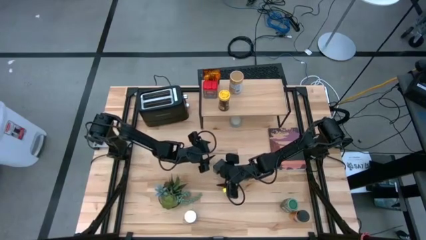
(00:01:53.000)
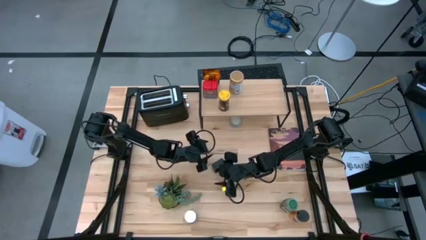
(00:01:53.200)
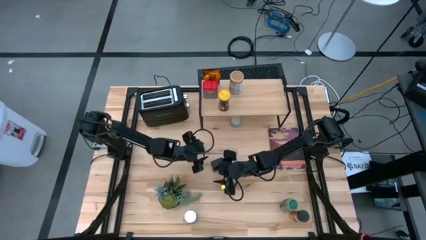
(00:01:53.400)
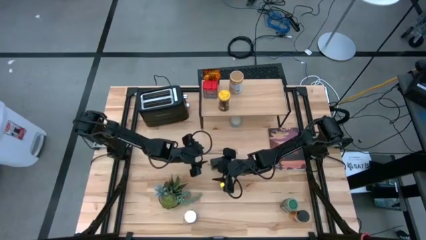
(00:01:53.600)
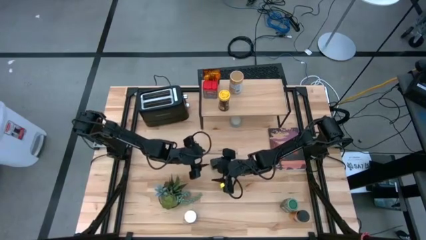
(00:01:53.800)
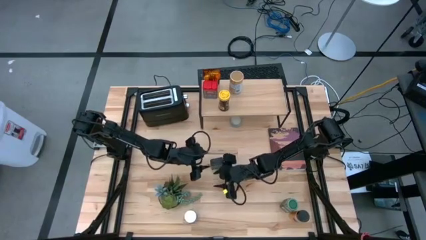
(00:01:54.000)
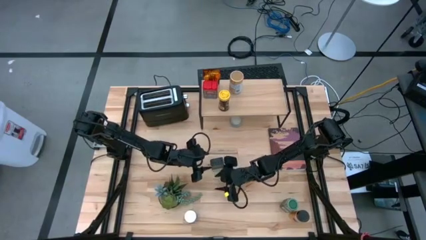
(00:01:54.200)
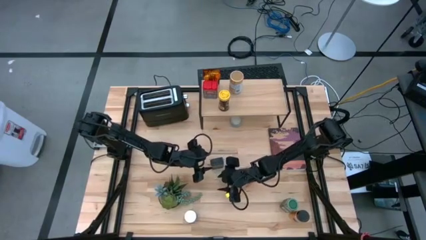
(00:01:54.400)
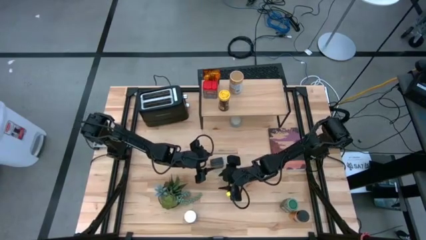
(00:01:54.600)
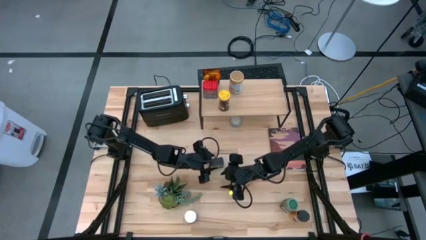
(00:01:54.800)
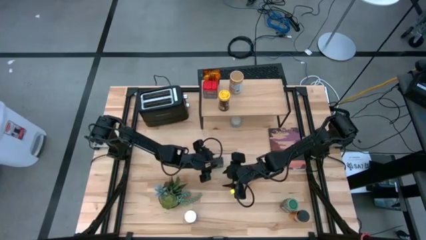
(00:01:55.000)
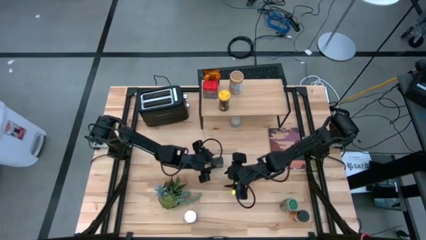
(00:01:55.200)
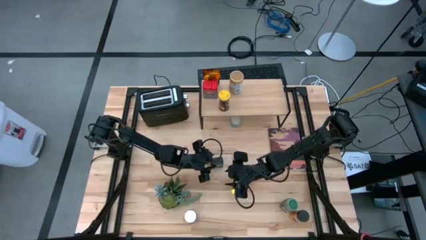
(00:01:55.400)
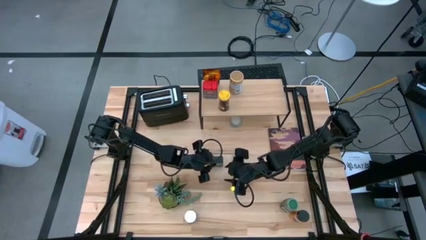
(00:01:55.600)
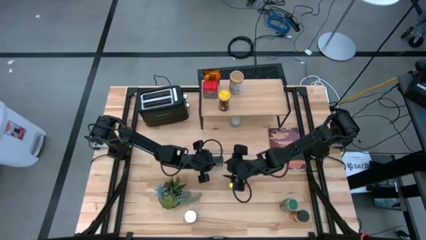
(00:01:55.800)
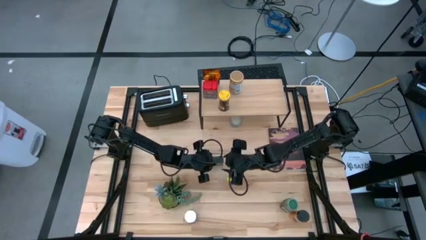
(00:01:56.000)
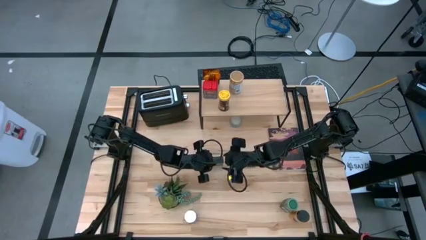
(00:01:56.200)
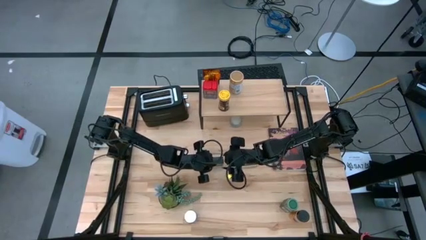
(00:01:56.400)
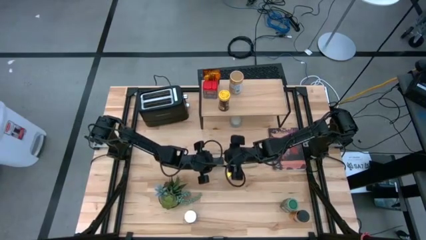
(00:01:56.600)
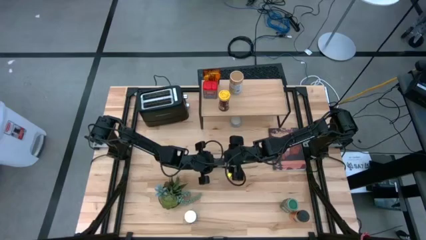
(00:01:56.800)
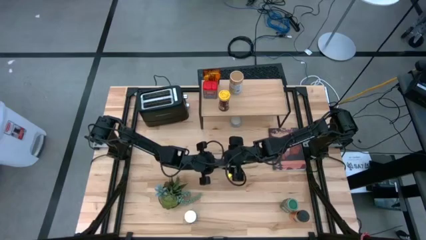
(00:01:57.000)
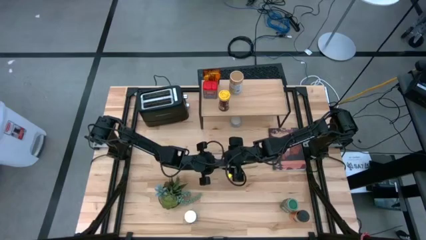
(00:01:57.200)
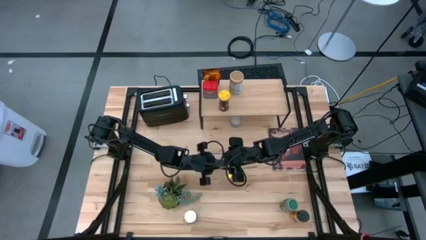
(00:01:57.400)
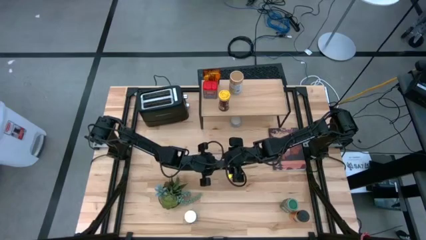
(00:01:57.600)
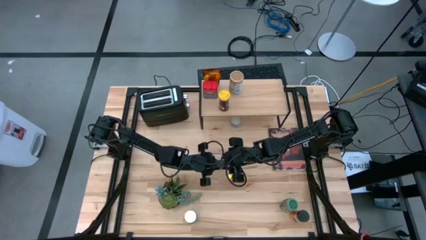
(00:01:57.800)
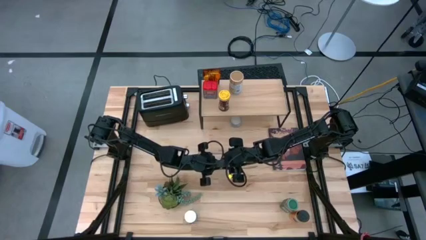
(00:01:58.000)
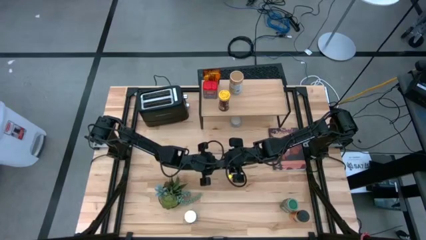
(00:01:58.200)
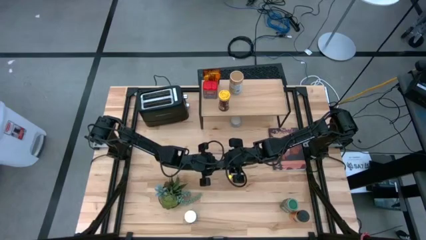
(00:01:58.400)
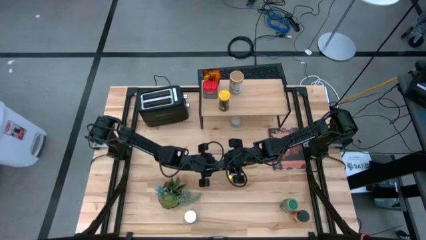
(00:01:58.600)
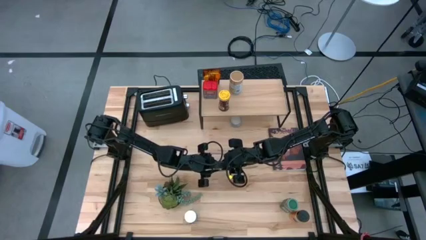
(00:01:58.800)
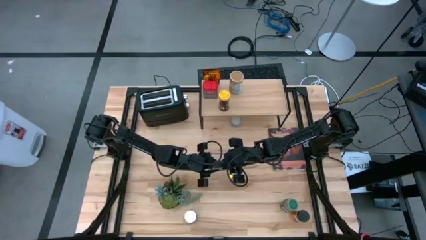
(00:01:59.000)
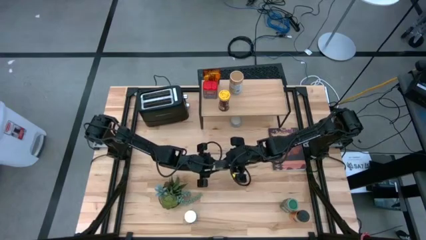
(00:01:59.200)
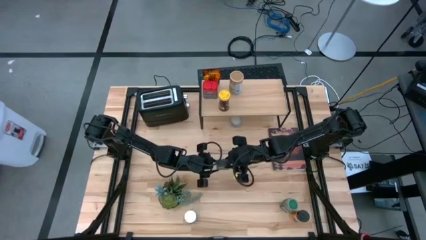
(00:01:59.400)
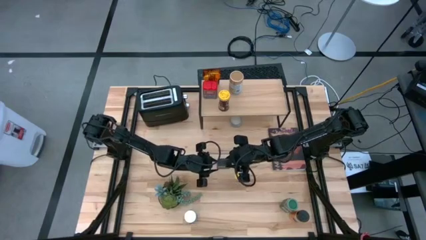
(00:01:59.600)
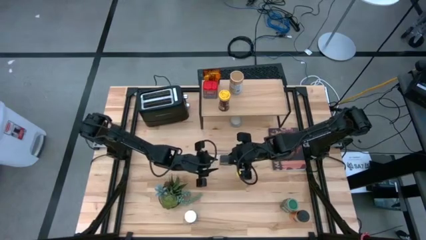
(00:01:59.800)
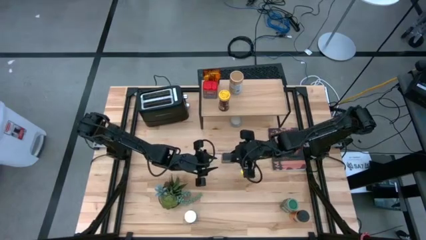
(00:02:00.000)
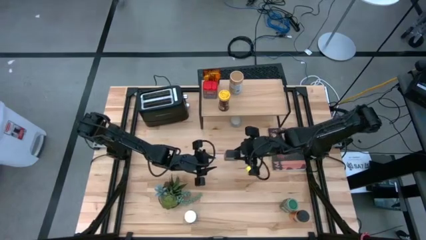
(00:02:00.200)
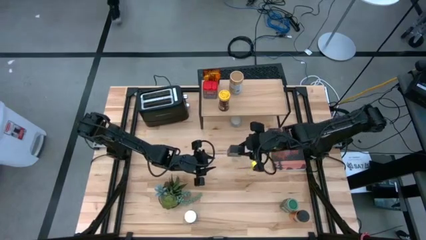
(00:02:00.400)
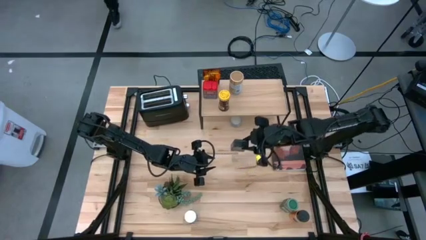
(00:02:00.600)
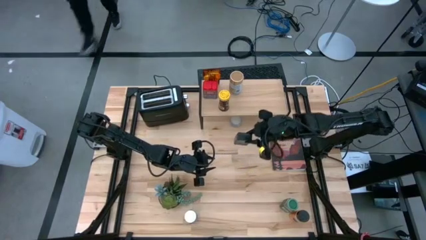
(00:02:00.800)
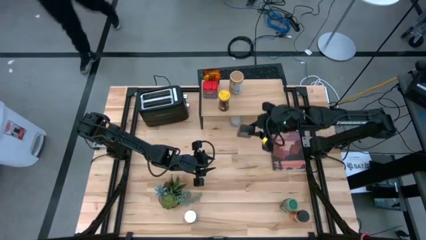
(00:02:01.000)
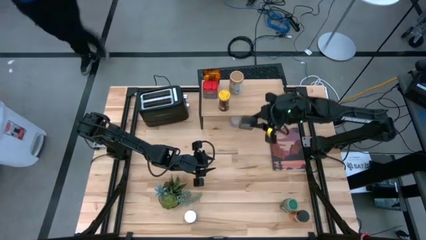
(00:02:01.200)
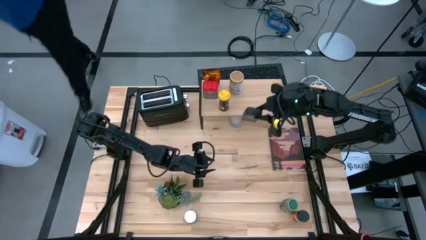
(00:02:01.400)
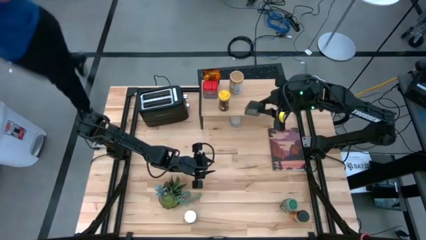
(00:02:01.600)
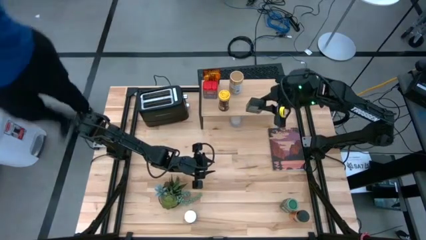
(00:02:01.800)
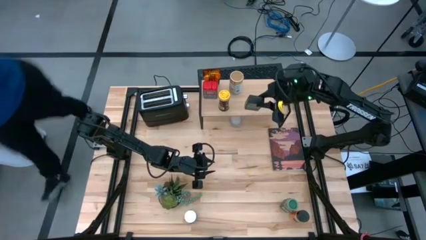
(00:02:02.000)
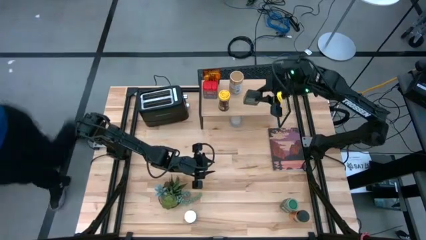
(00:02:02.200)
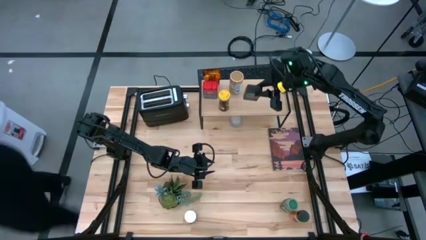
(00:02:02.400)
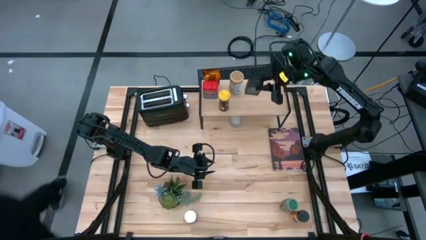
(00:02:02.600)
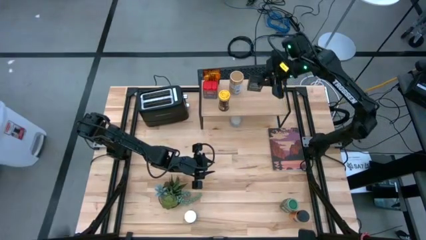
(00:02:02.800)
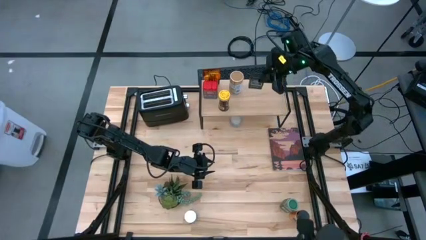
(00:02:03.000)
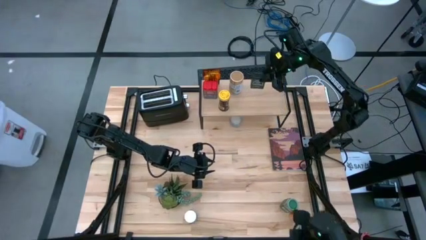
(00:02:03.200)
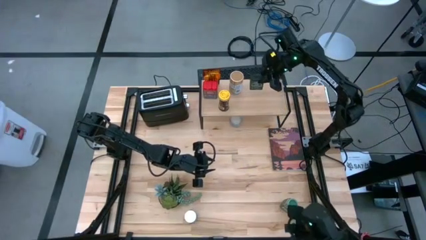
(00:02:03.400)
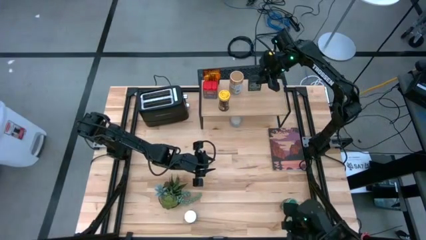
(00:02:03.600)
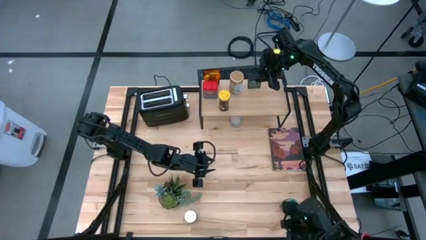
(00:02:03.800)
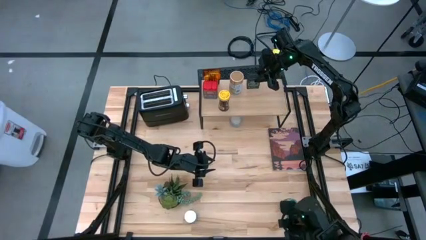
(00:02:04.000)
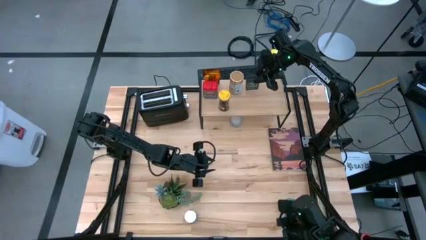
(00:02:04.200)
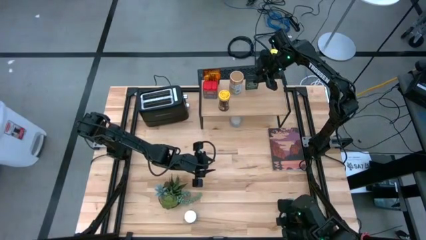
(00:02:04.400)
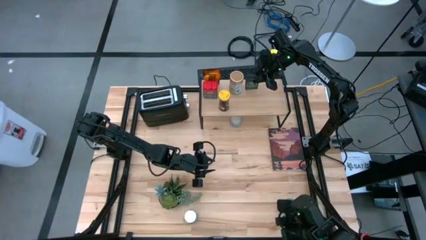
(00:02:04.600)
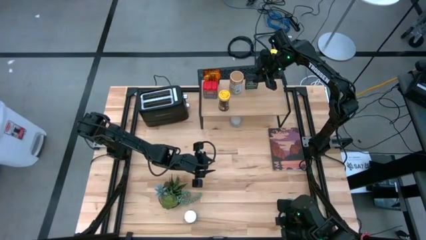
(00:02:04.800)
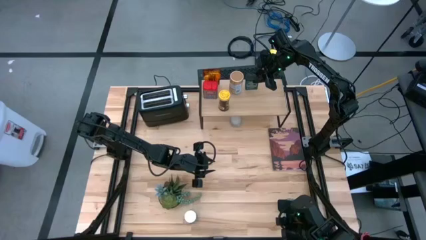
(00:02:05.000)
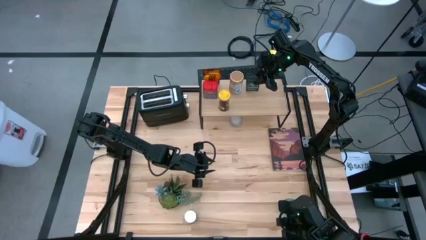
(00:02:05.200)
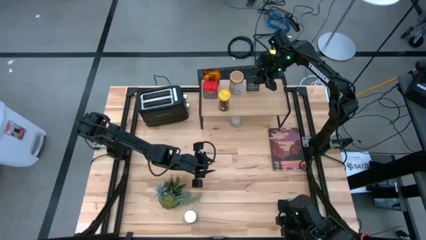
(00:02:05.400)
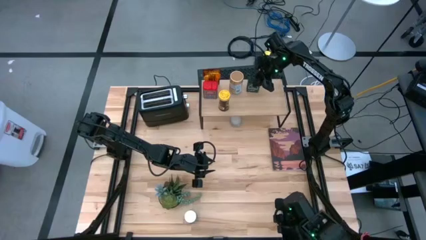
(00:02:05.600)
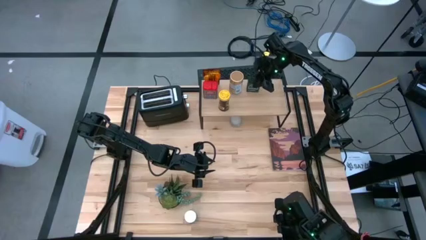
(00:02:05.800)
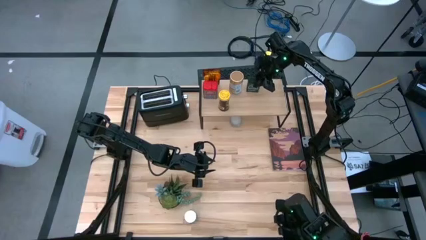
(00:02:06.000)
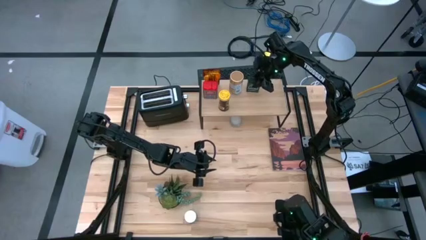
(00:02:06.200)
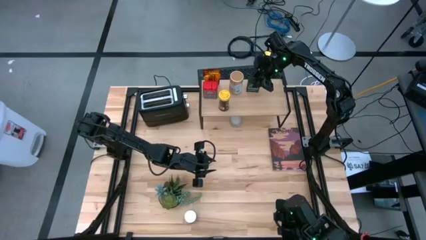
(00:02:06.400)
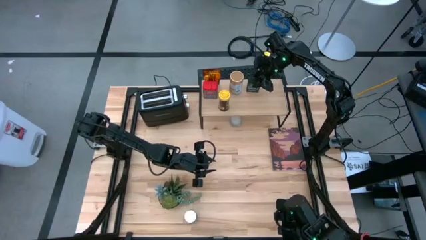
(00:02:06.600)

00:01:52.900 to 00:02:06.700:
Task: Shelf spices
Put the black seasoning can on the shelf

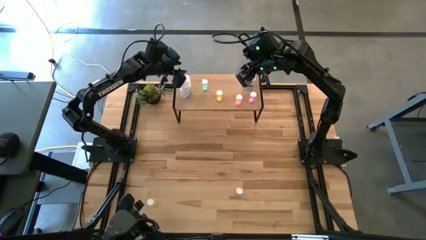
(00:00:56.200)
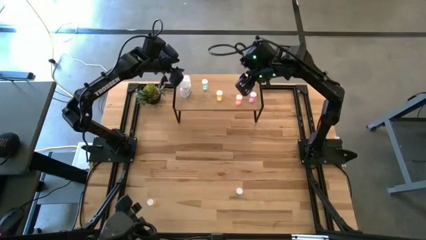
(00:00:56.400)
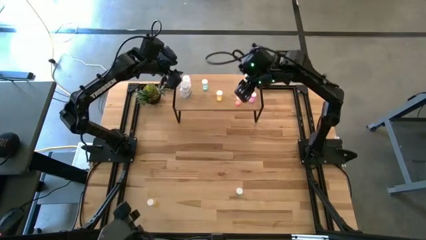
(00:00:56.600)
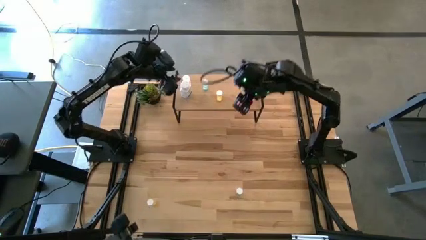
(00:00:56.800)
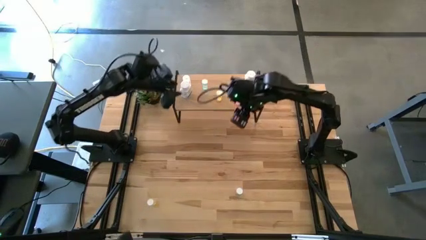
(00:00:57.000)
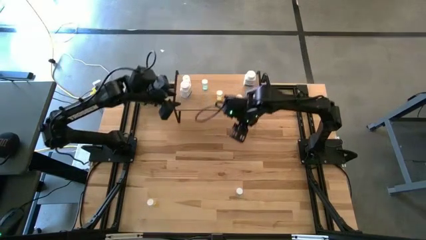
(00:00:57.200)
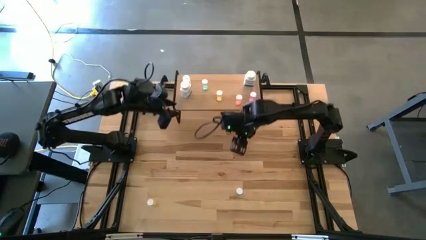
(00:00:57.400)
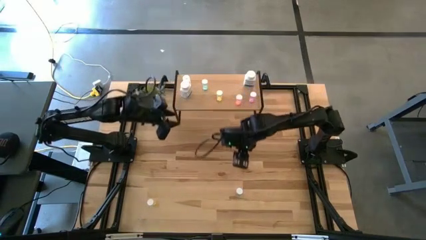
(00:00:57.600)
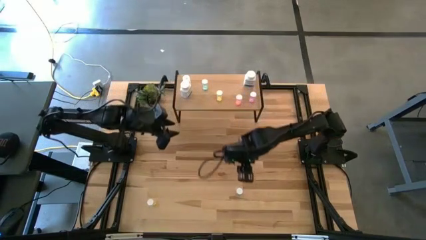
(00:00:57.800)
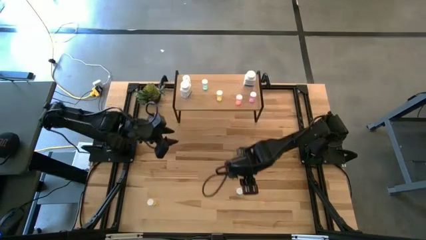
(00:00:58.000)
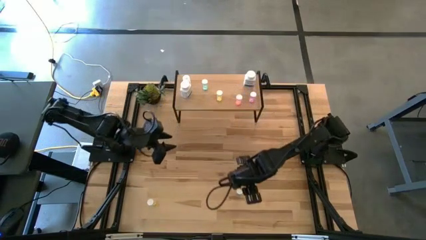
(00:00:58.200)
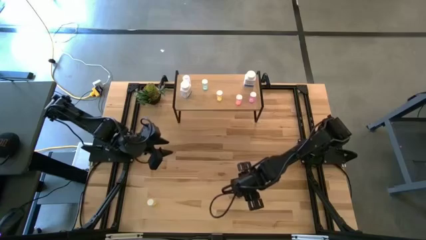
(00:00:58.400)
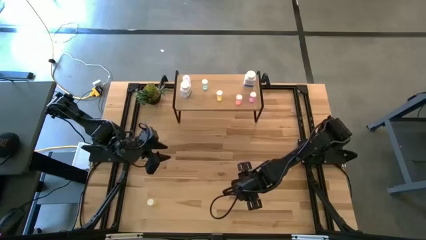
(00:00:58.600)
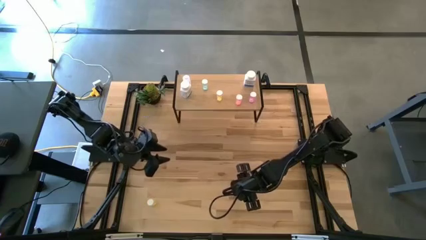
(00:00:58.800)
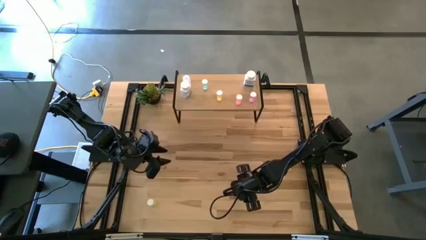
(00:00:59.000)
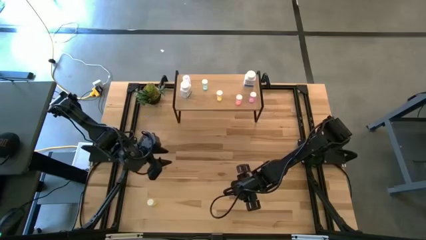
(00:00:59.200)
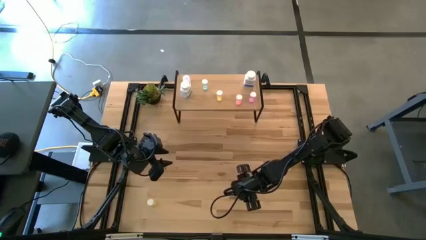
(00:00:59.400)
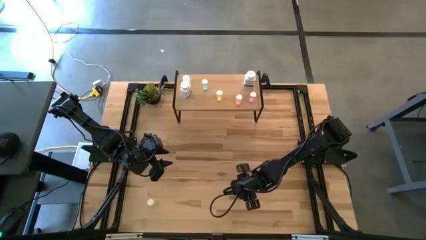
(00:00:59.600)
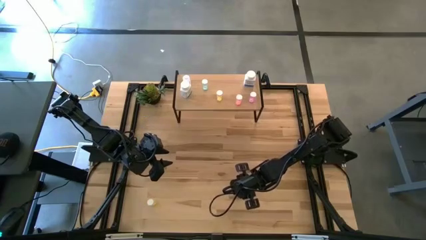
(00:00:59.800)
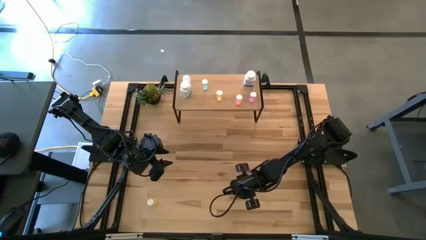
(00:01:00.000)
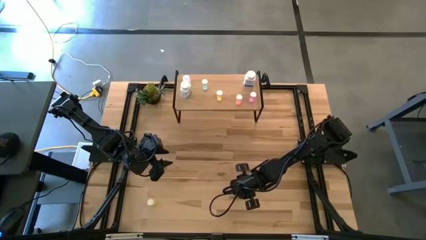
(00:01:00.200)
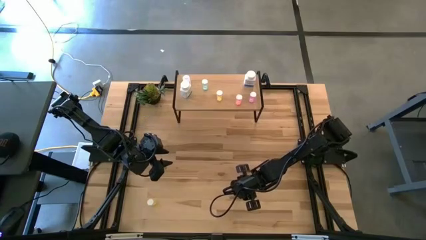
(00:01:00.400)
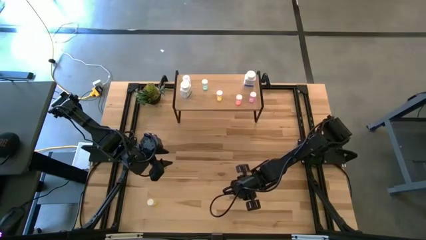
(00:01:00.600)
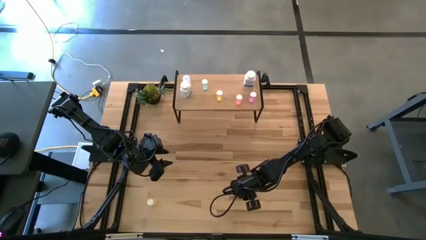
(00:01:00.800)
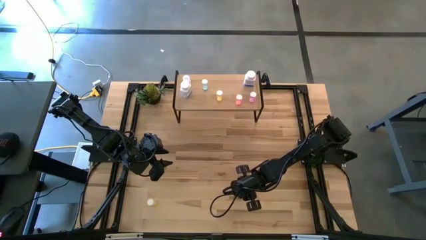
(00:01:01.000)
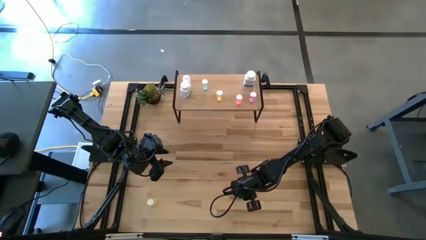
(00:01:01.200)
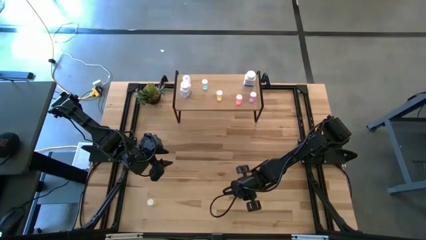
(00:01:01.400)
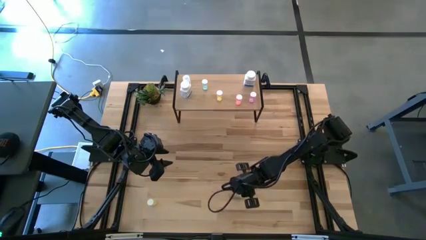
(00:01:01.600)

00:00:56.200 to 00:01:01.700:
Task: Pick and place medicine bottles onto shelf by color
Put the blue pill bottle on the shelf
